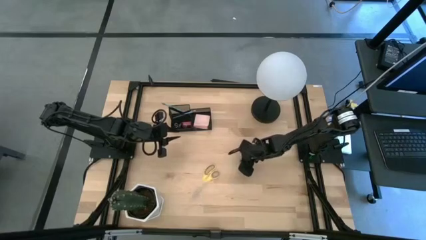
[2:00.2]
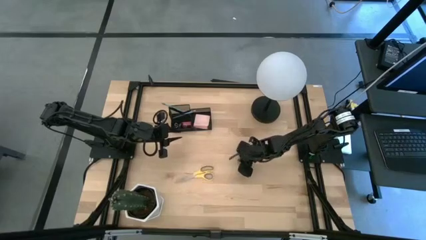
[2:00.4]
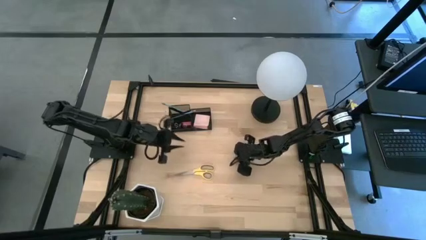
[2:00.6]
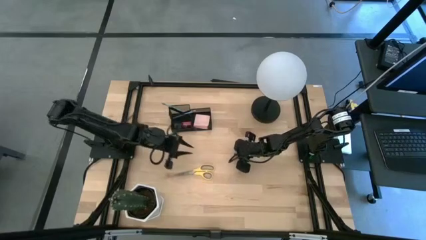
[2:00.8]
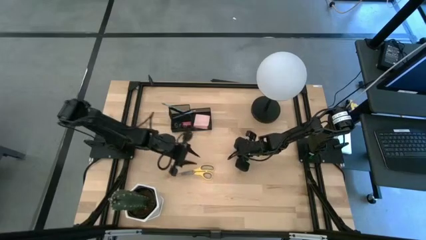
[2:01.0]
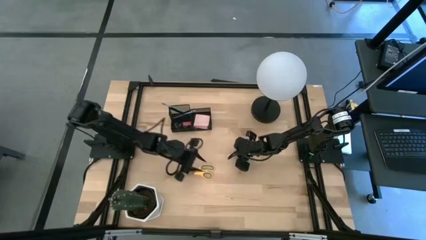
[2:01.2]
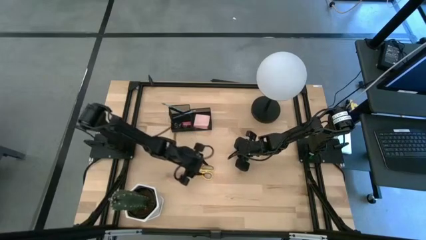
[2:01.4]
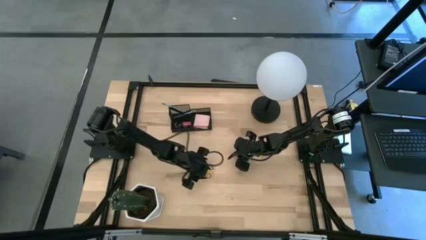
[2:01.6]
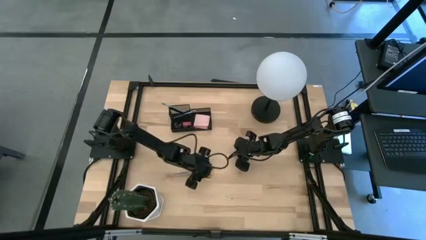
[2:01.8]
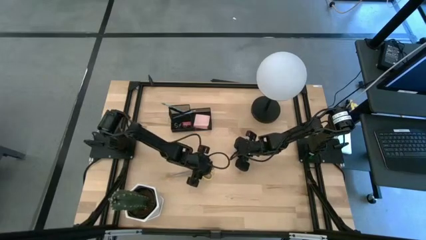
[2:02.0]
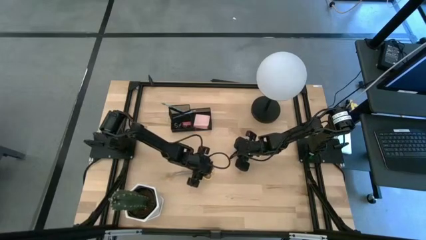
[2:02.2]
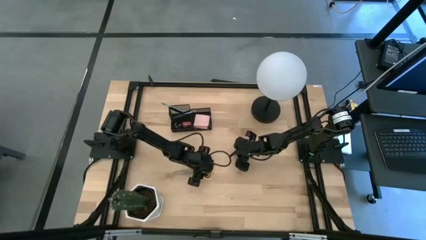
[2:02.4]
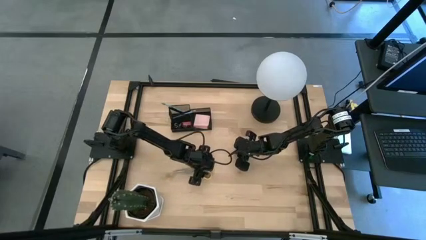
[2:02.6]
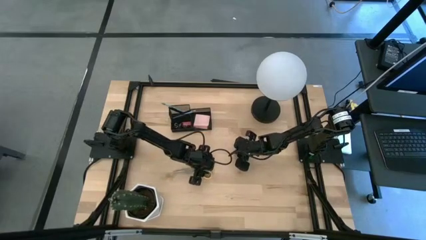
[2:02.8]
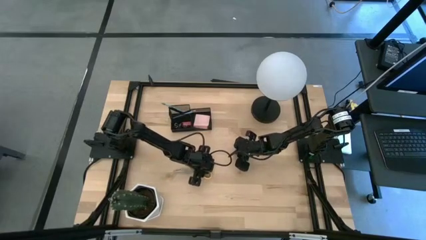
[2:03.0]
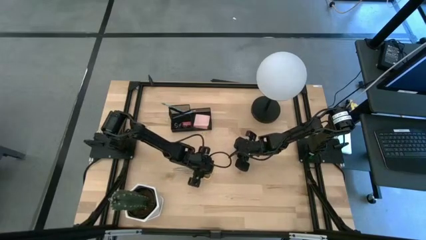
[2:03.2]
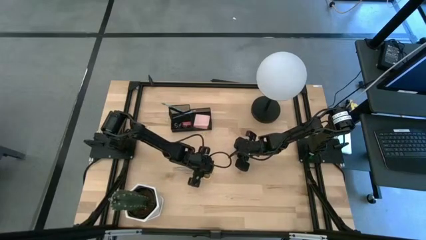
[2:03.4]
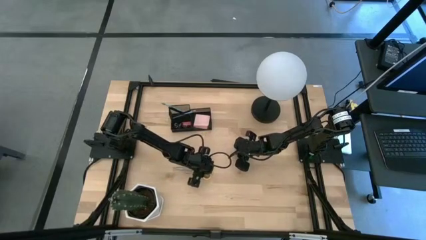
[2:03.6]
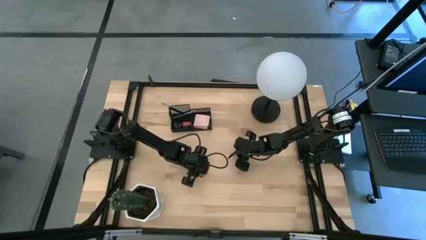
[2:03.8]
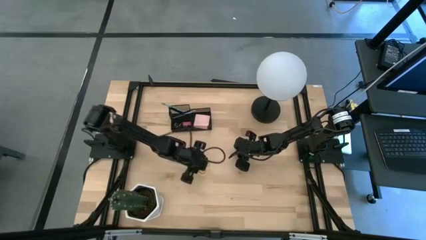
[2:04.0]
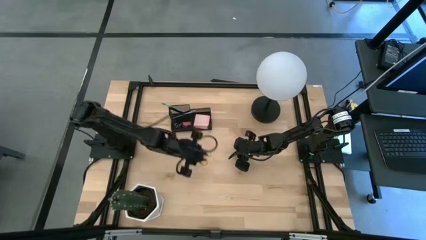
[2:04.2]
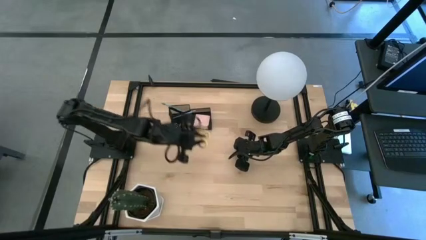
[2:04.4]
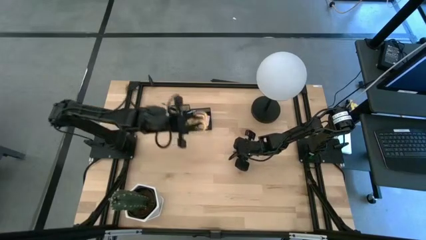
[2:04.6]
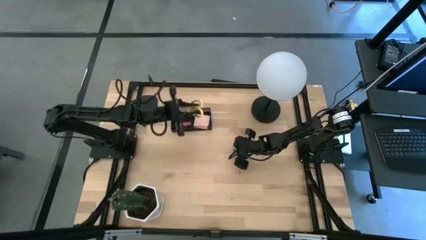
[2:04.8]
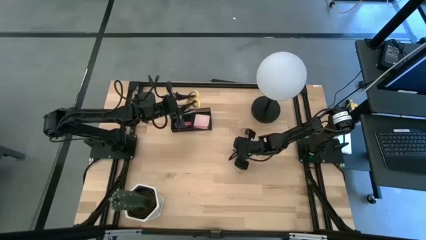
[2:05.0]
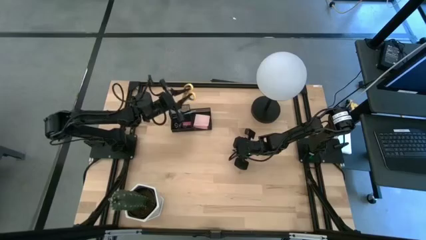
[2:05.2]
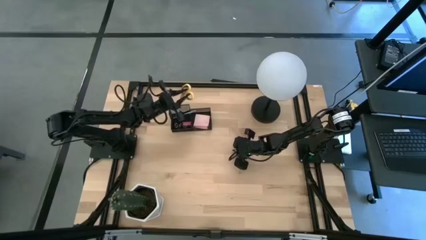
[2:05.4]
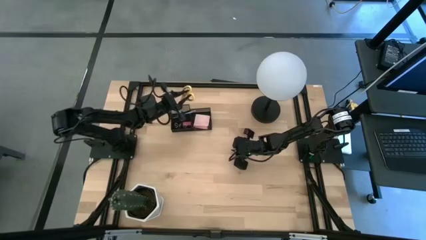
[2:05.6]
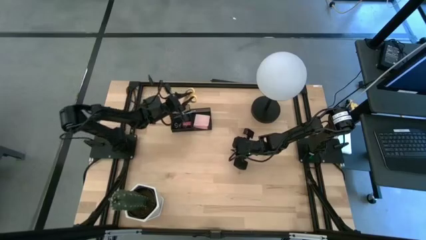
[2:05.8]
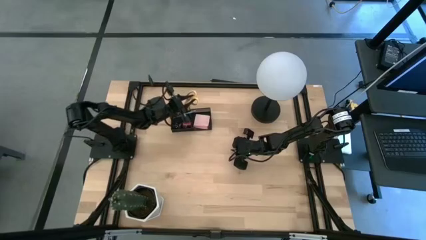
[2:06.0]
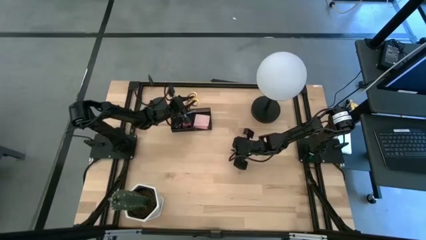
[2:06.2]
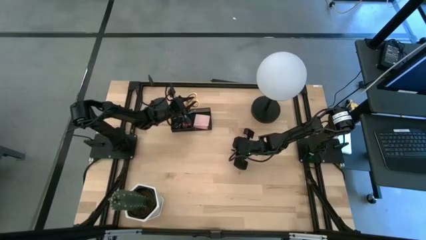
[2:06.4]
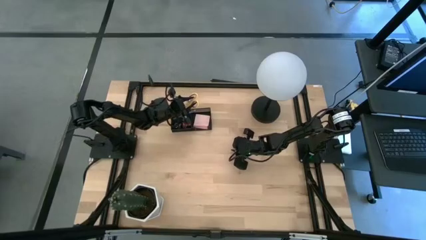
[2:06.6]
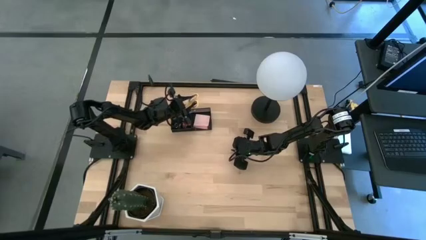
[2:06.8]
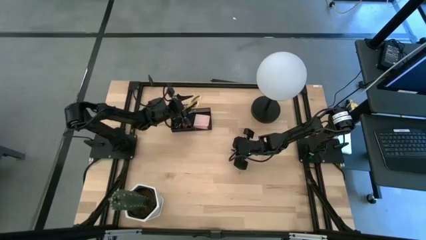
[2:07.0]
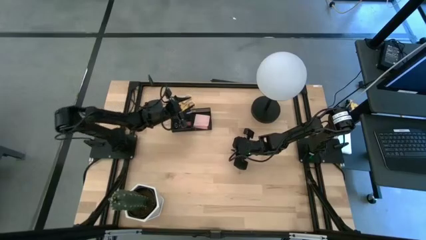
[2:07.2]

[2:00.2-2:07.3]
Task: Pick and place office supplies into organizer
Put the yellow scissors into the desk organizer

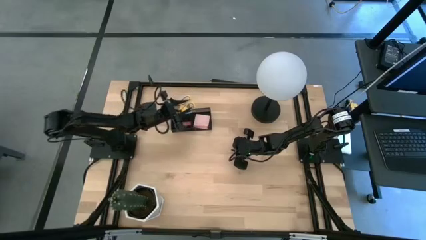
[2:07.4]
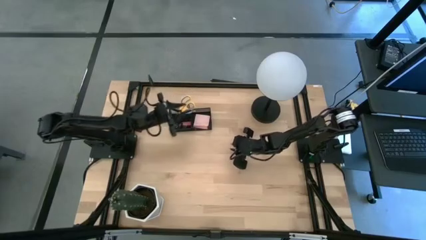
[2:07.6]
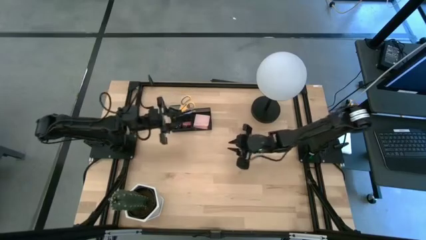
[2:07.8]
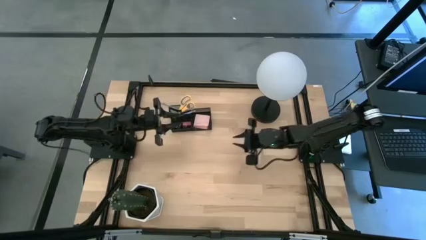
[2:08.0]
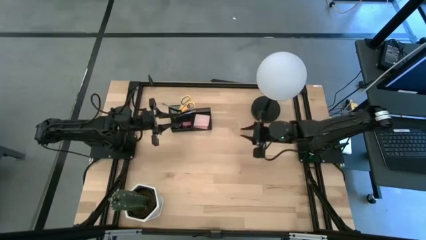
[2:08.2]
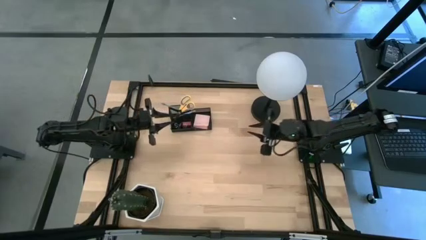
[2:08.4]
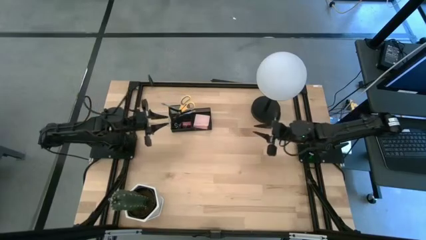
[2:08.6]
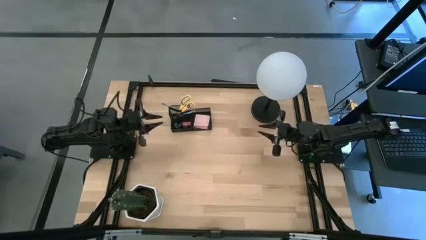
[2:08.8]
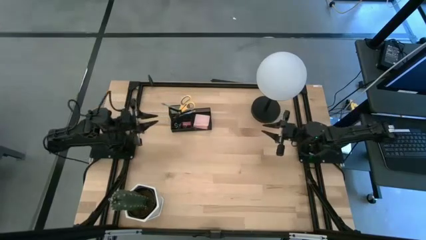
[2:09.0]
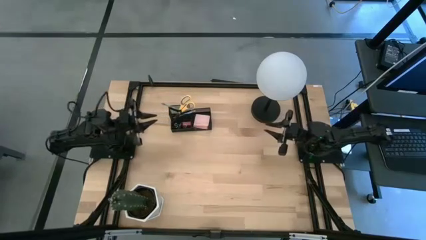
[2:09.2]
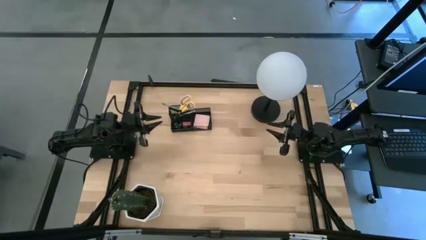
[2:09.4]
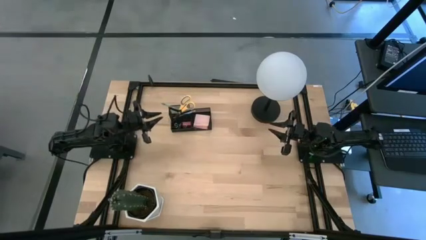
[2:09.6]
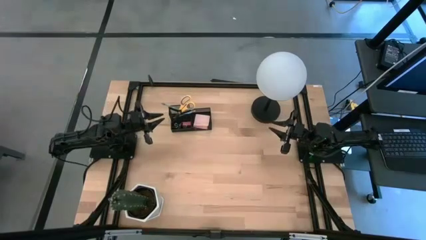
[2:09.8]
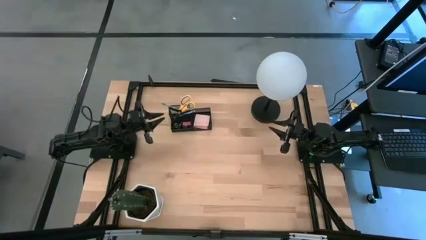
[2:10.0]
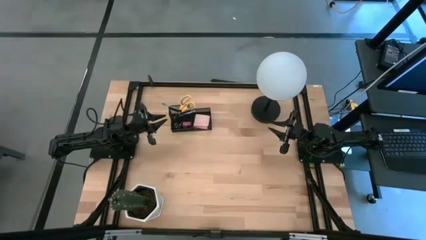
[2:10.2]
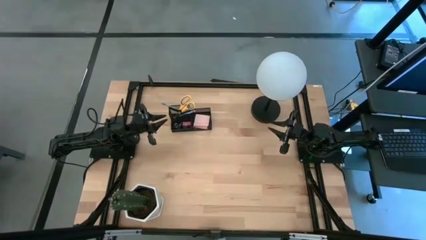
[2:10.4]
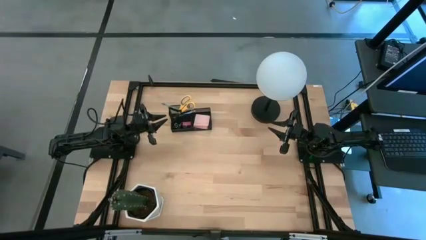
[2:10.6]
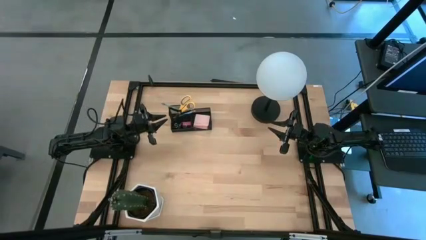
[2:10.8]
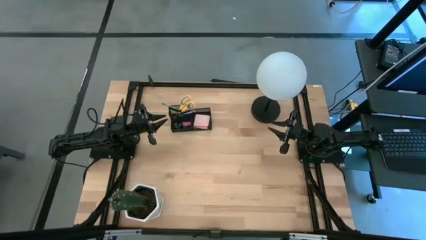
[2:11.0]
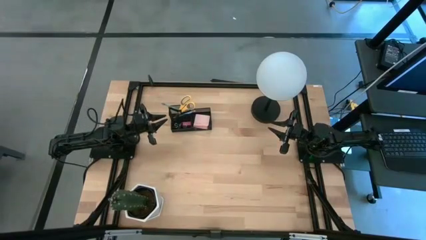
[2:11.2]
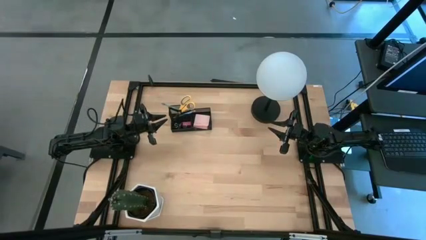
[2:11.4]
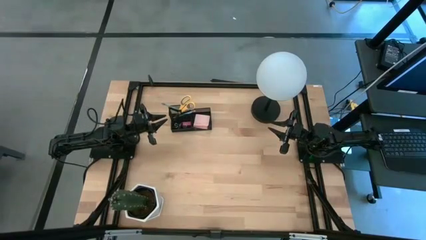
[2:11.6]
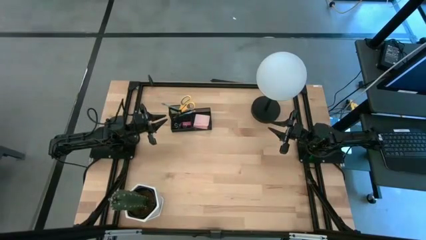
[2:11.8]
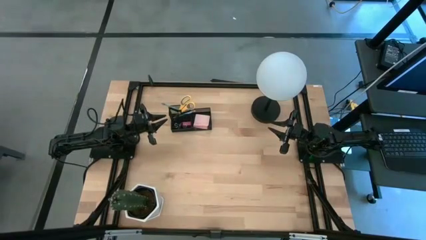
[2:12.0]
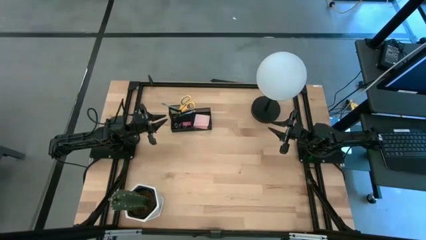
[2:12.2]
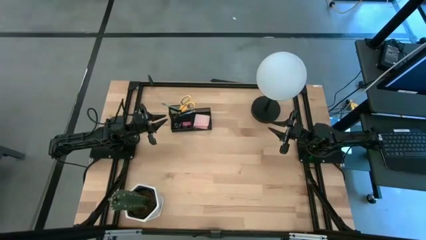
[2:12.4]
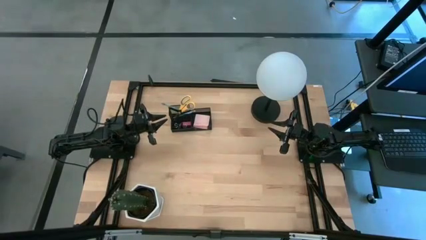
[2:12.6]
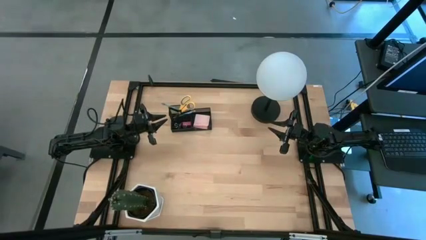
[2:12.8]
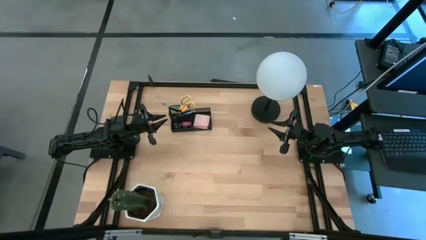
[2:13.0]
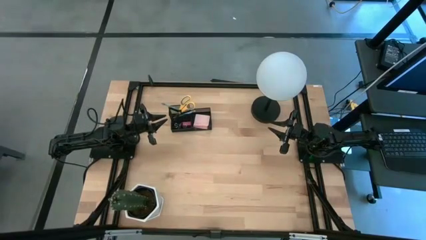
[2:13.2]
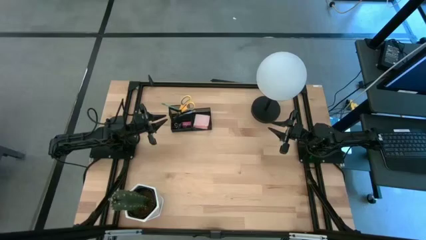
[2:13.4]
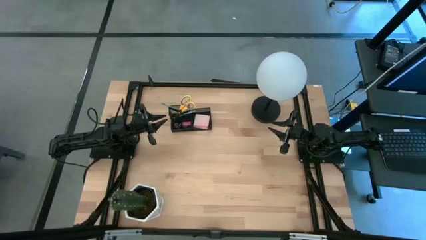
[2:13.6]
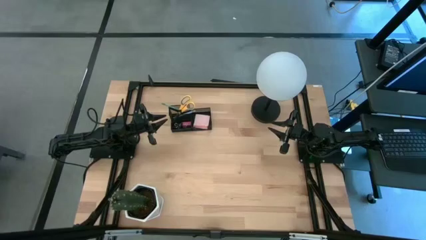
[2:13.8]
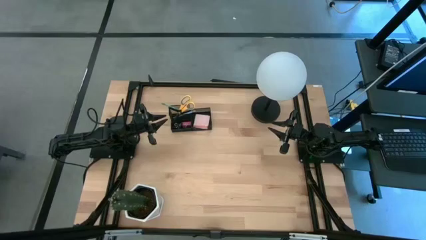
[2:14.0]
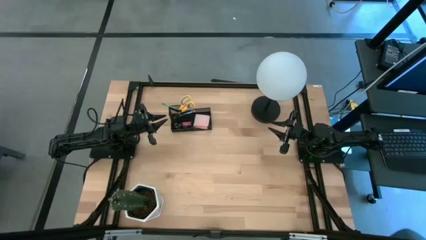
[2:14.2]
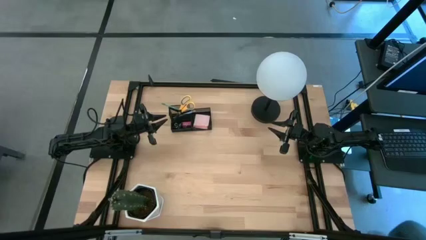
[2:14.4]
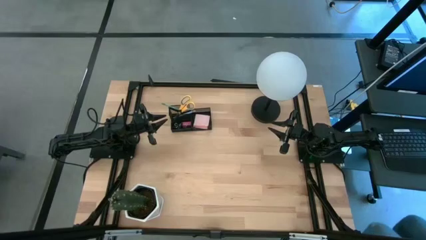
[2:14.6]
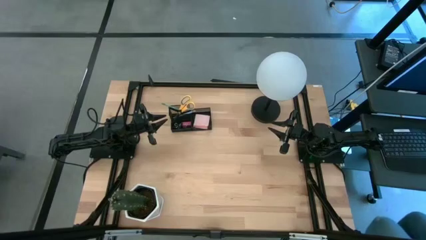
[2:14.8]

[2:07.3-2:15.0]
Return to Home Position

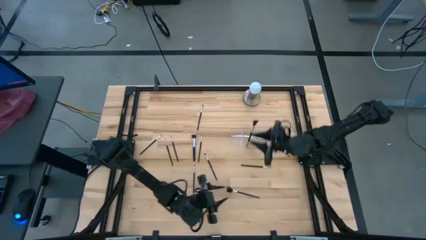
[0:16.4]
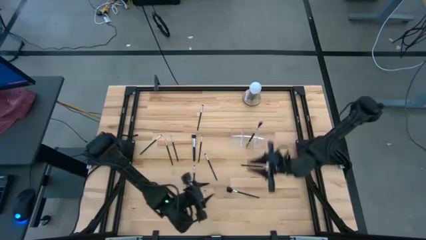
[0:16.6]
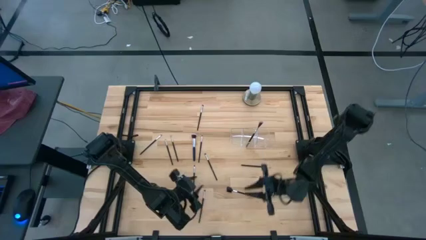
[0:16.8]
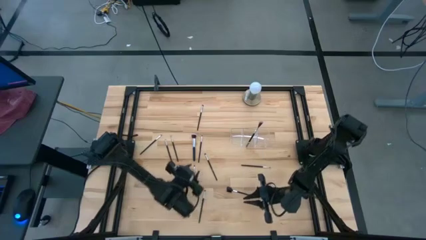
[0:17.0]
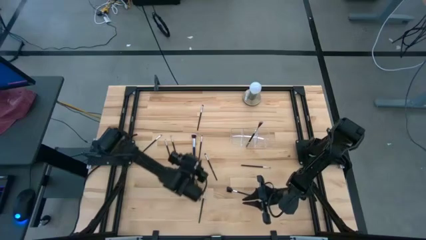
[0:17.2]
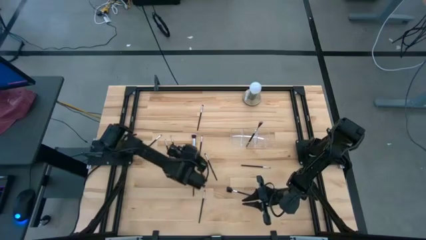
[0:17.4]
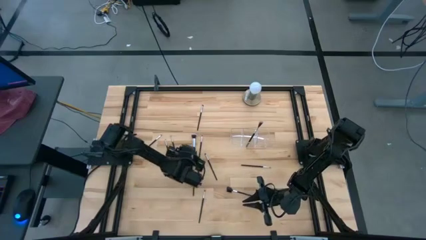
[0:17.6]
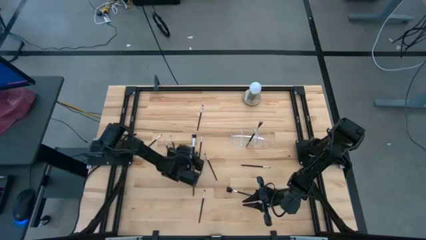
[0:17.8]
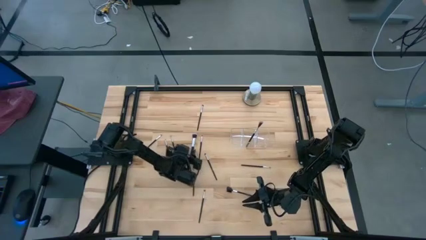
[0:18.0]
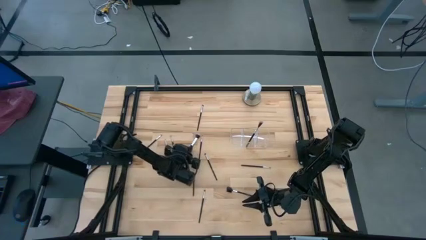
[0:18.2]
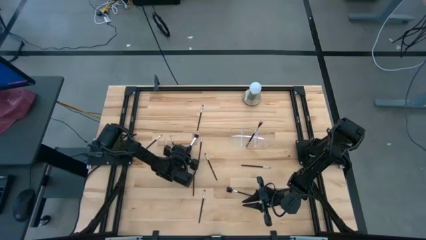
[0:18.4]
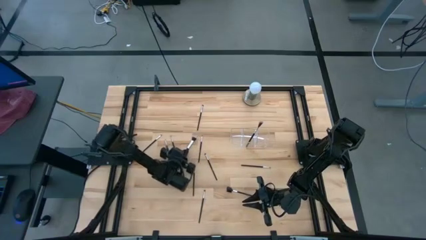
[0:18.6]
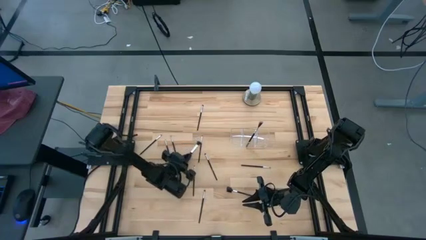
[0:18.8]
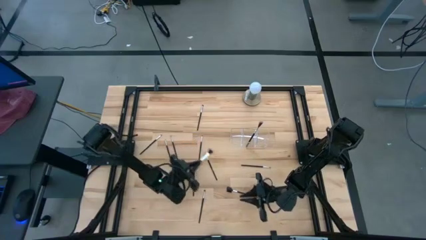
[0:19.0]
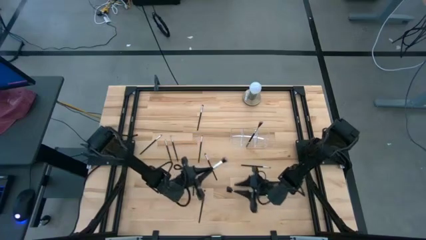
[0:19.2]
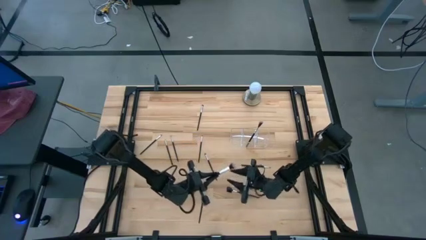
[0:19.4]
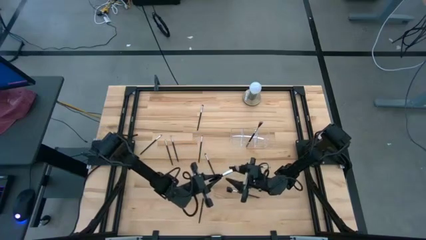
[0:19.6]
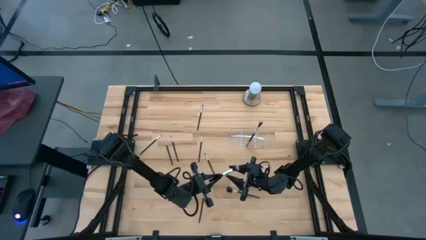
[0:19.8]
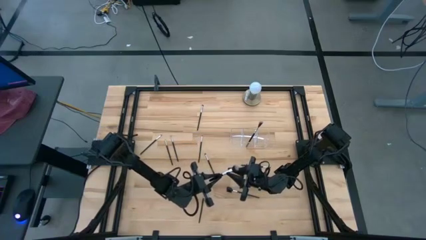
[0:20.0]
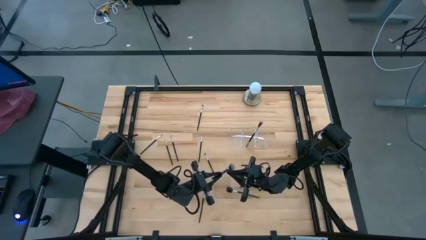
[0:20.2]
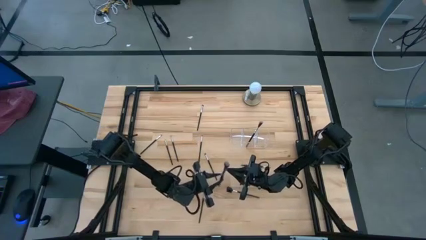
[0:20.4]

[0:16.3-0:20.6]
Task: Put items in baskets/containers
Put the black blush brush into the transparent organizer
